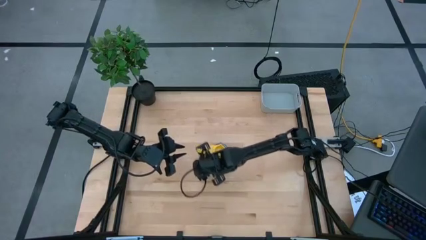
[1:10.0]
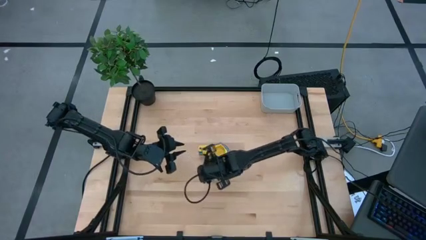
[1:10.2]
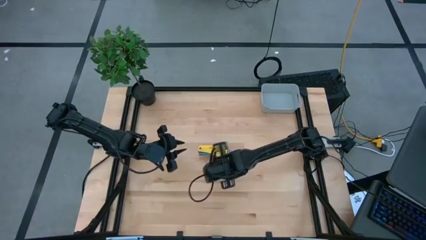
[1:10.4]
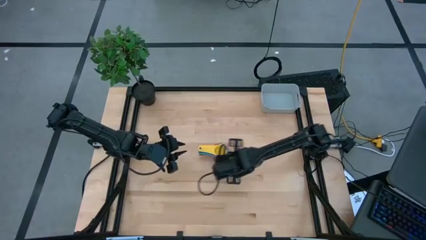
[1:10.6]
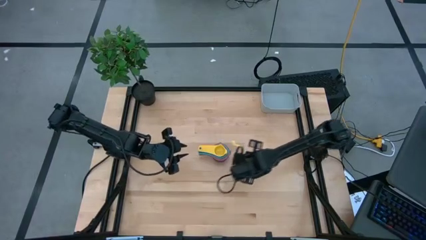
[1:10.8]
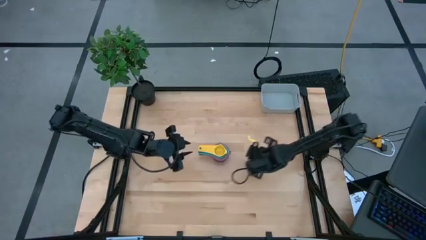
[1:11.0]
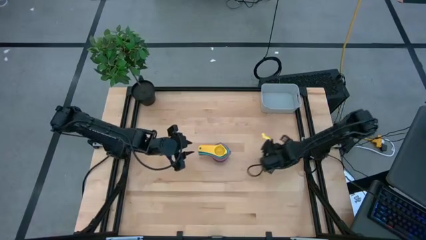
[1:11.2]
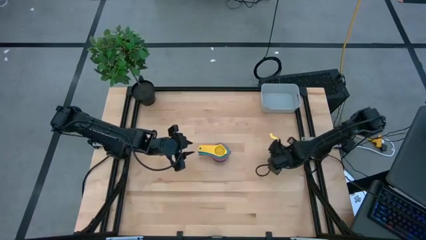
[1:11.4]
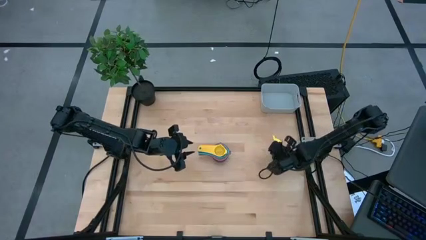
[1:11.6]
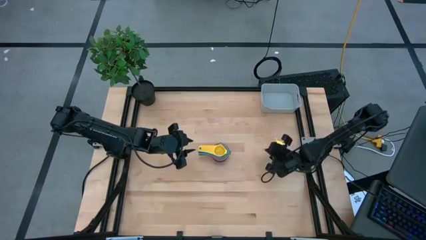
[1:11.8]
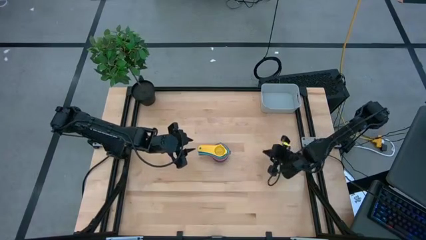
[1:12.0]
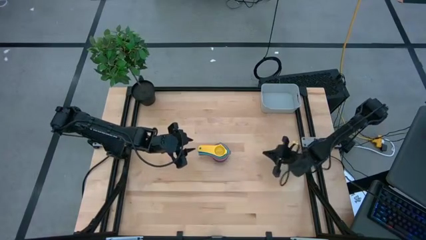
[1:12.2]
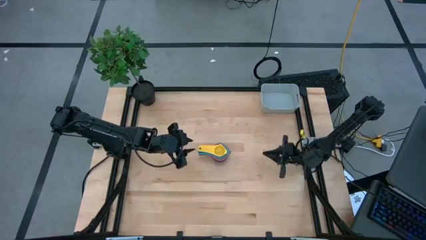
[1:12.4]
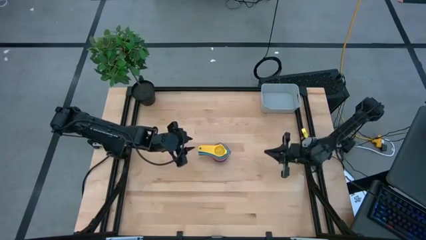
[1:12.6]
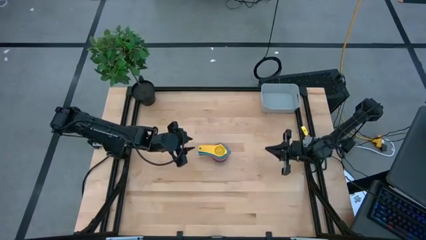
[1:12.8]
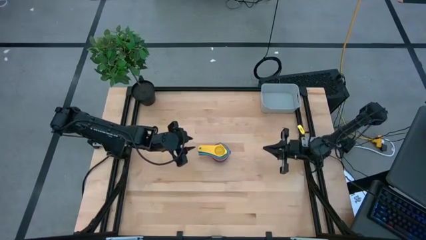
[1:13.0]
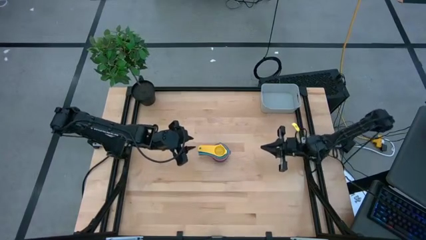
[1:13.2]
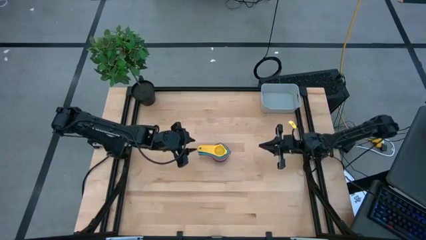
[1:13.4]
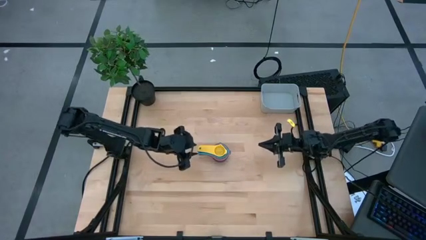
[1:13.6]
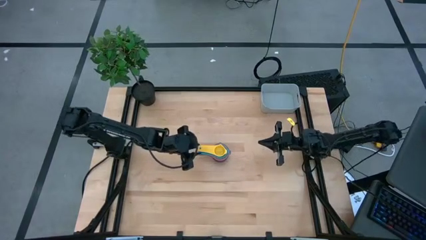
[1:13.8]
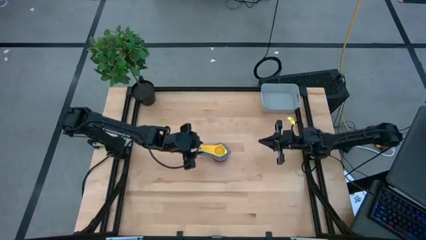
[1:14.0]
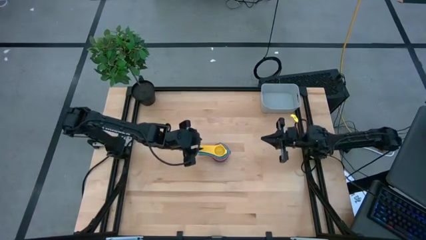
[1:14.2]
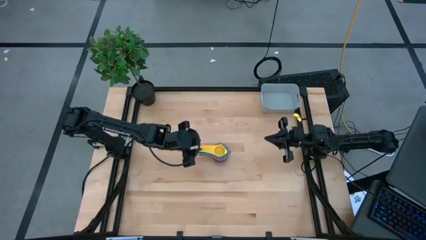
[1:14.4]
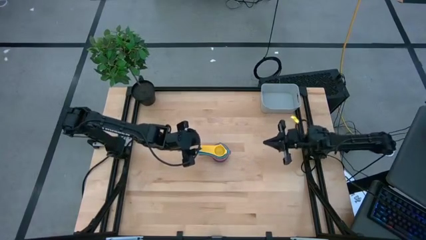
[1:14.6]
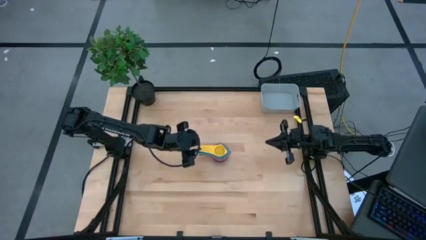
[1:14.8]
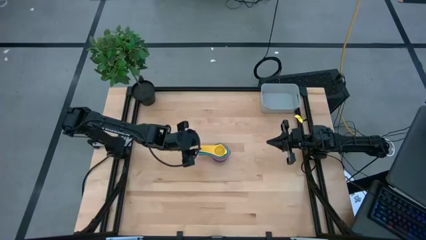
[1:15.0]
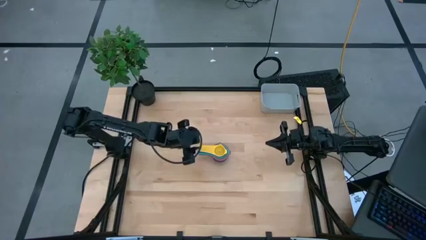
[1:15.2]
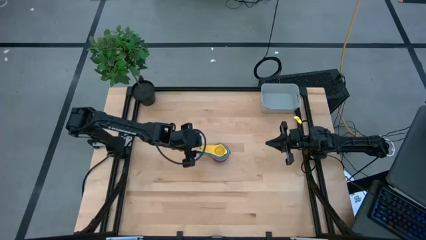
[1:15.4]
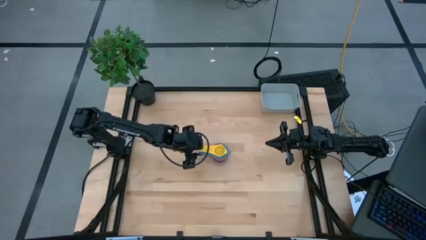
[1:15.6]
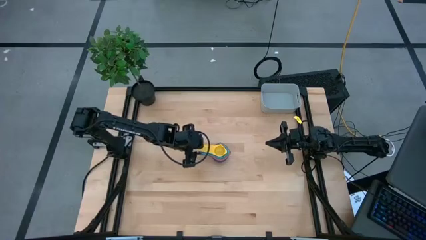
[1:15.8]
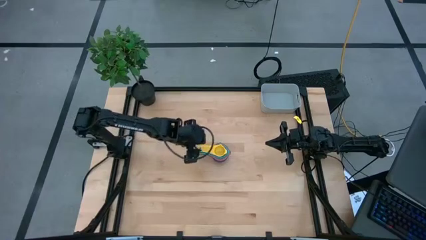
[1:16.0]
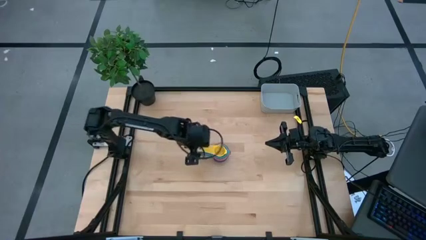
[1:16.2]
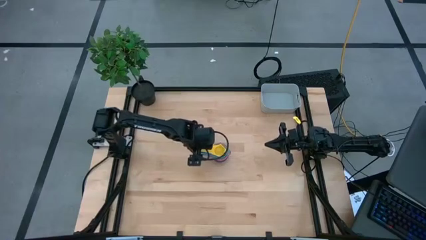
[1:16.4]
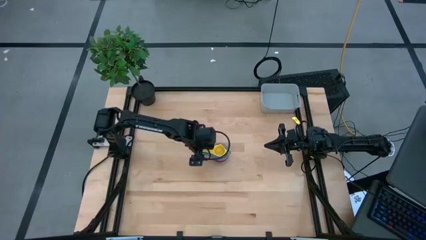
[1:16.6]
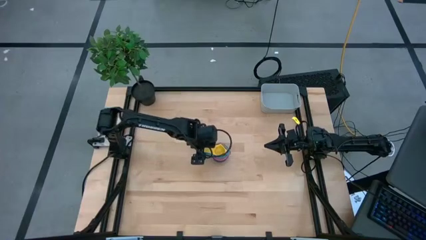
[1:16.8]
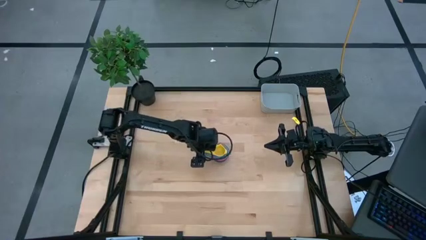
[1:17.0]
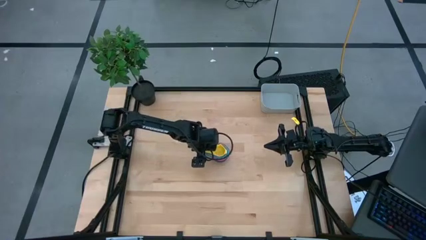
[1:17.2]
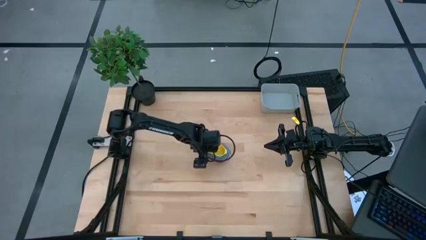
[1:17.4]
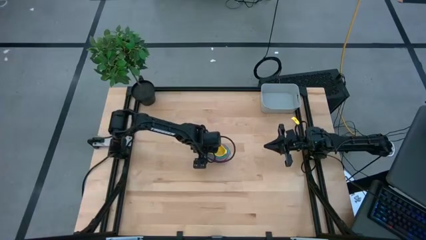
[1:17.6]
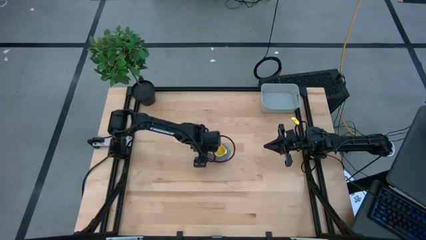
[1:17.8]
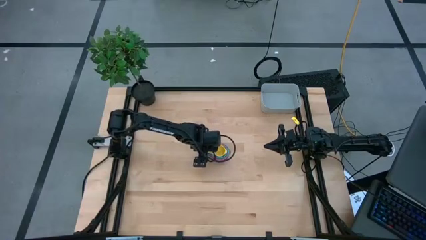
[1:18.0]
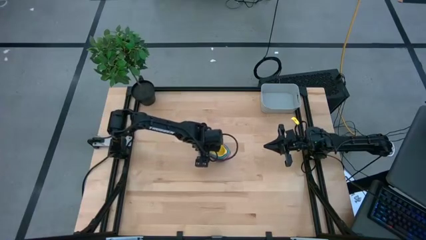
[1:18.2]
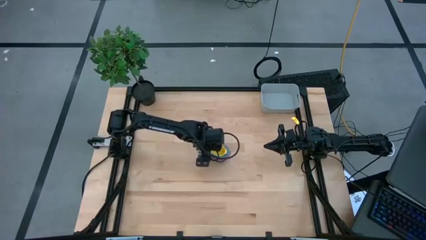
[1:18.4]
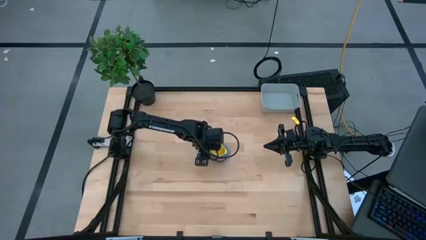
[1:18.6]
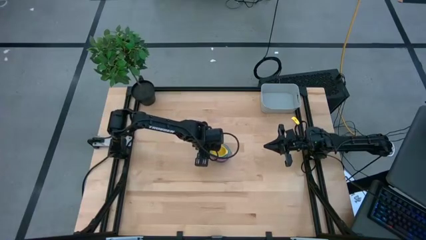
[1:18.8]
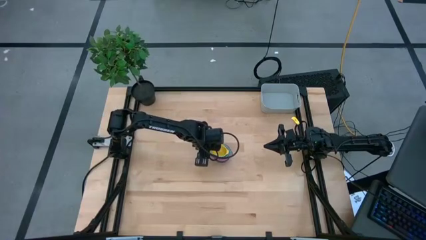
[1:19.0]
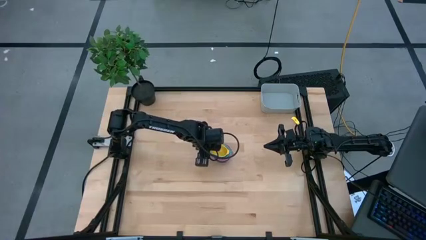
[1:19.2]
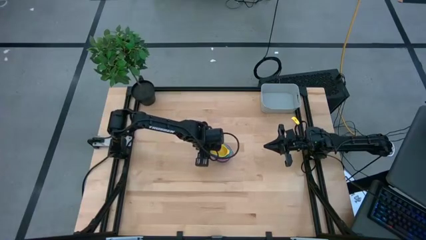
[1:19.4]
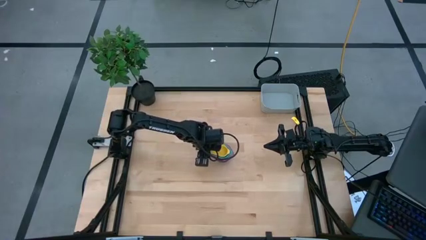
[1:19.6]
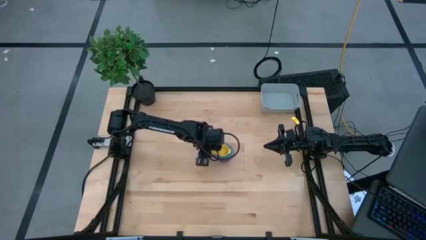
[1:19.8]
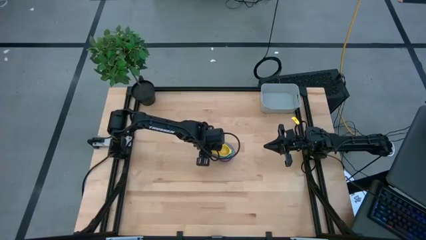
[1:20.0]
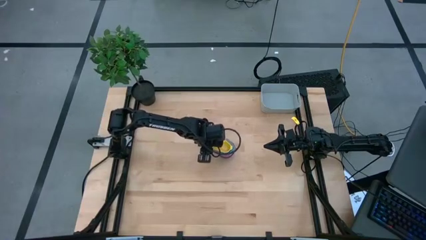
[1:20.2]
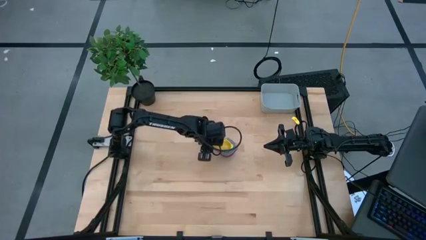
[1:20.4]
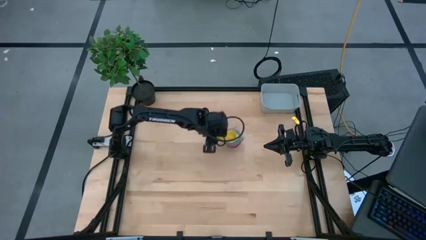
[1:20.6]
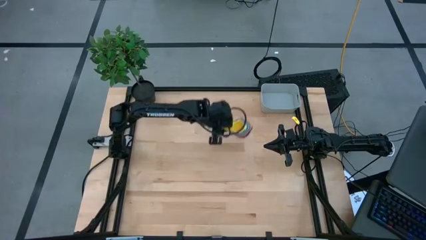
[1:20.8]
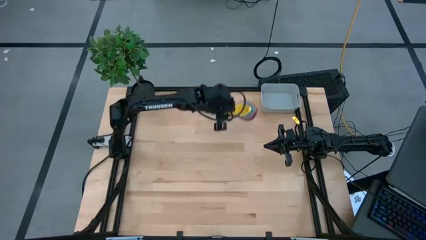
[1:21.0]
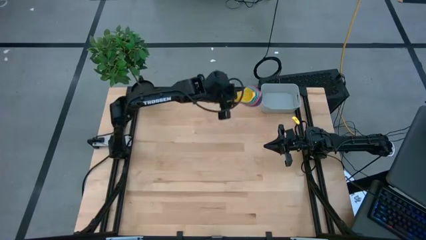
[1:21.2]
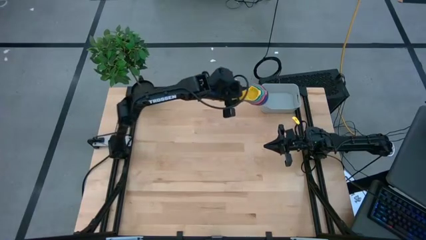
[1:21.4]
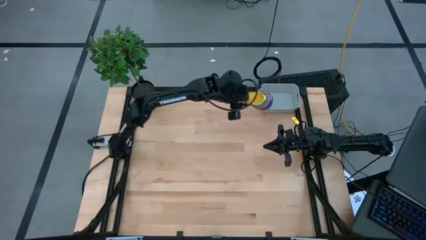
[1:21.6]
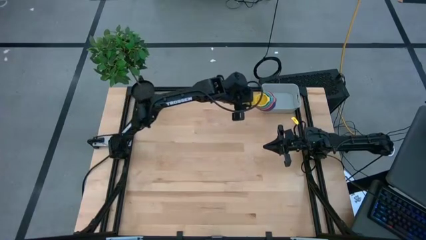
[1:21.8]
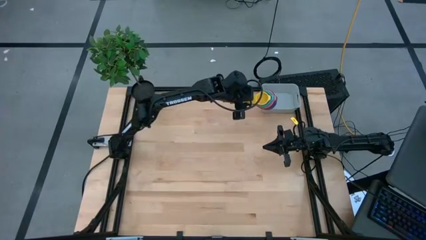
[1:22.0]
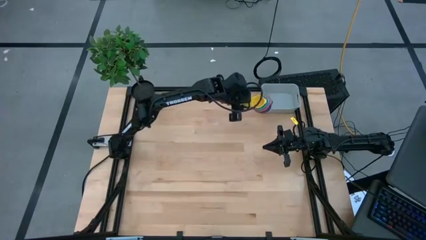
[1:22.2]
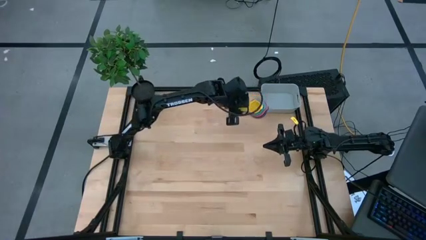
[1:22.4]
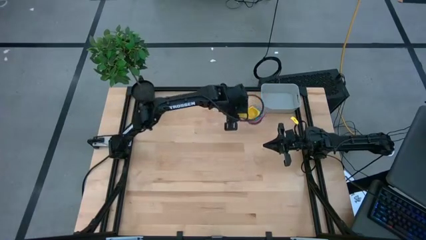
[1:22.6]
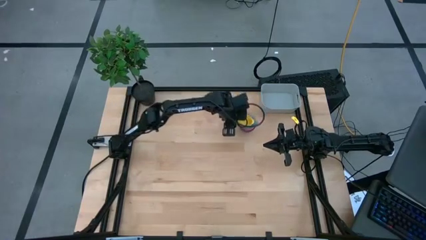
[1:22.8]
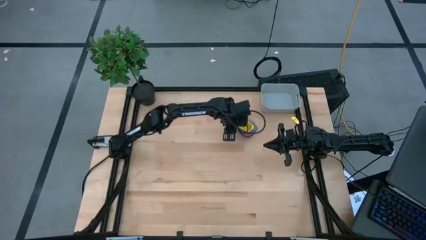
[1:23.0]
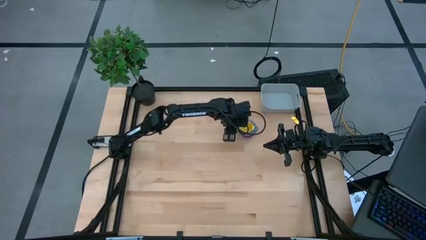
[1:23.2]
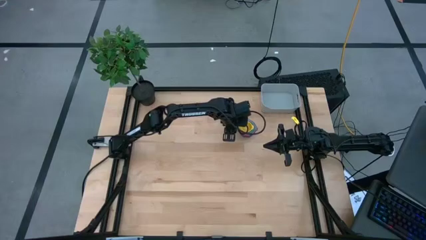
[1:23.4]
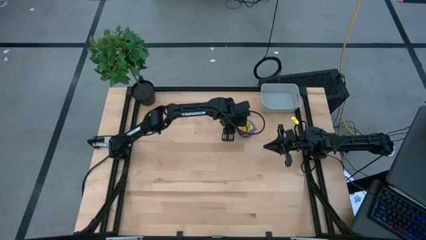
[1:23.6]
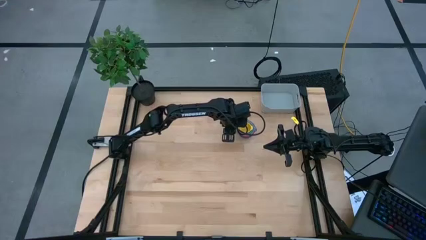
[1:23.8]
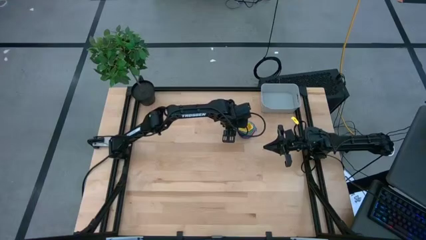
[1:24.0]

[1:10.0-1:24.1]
Task: Nest measuring cups in basket
Put the stacked colored measuring cups into the gray bin

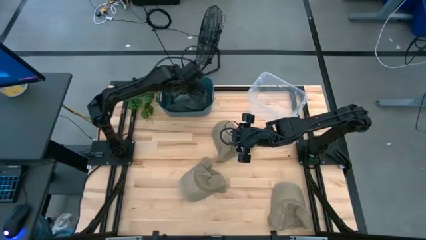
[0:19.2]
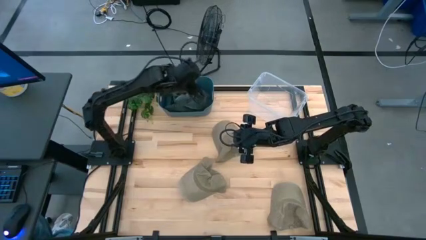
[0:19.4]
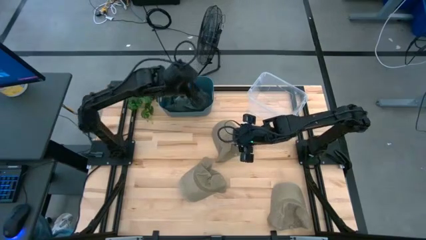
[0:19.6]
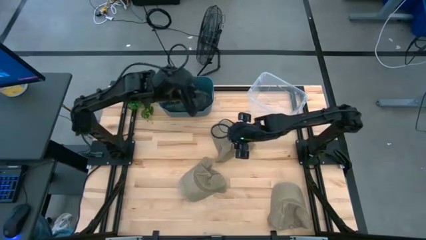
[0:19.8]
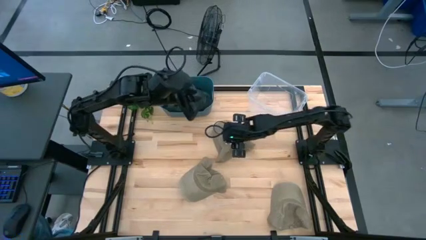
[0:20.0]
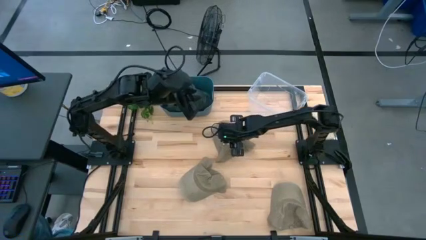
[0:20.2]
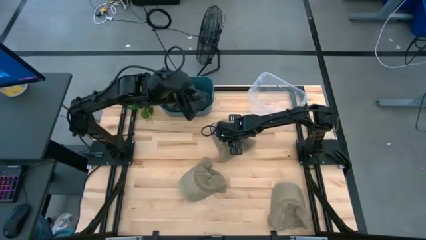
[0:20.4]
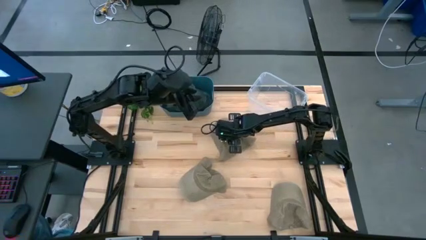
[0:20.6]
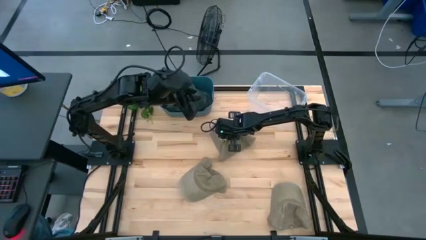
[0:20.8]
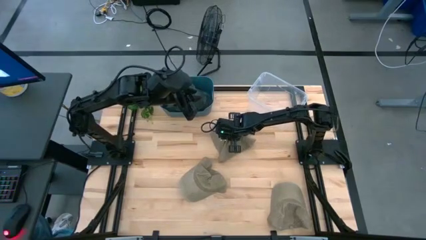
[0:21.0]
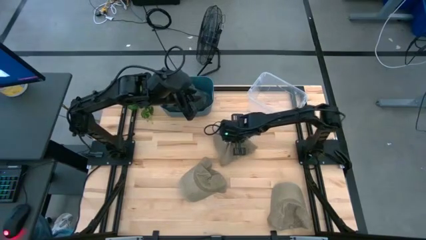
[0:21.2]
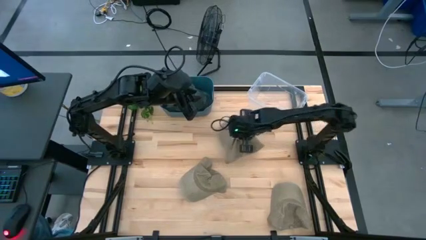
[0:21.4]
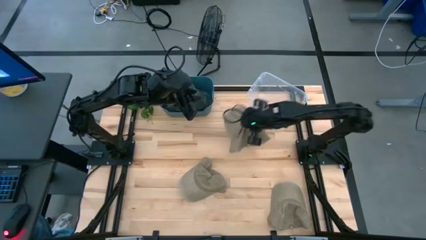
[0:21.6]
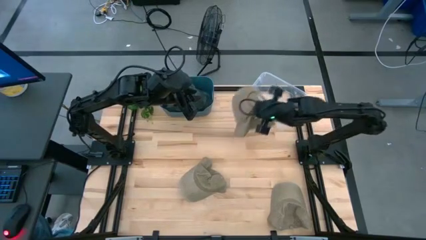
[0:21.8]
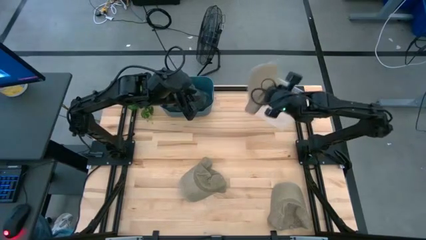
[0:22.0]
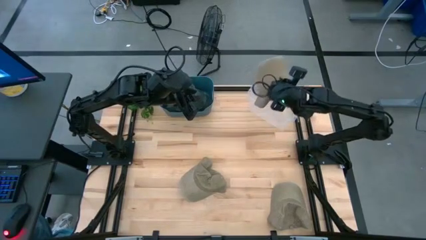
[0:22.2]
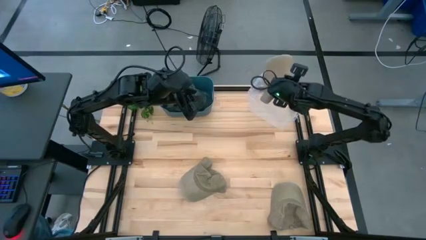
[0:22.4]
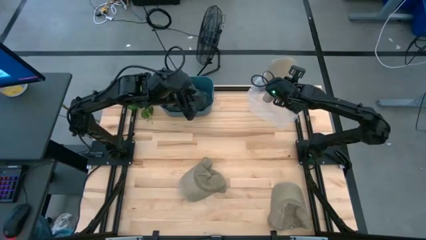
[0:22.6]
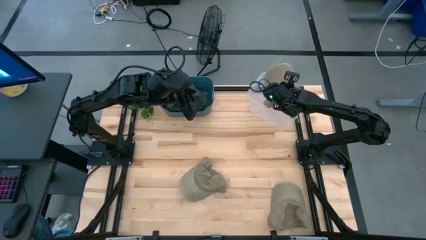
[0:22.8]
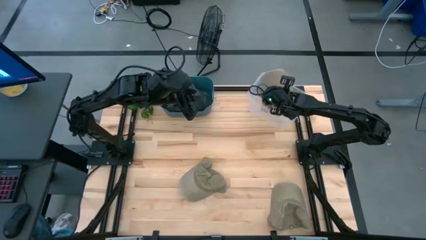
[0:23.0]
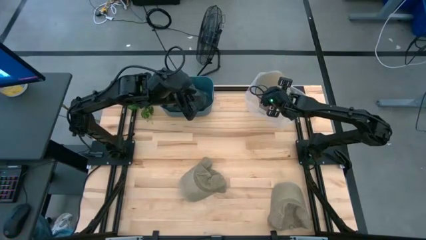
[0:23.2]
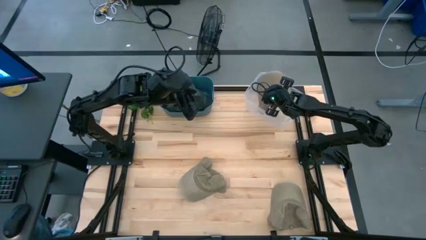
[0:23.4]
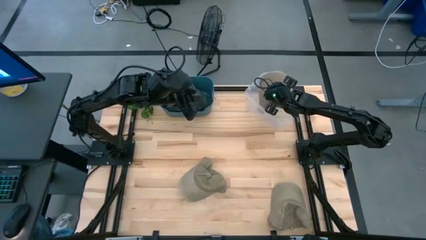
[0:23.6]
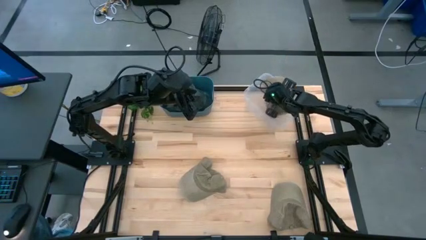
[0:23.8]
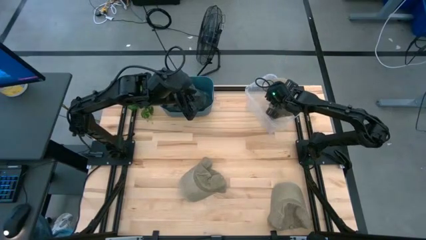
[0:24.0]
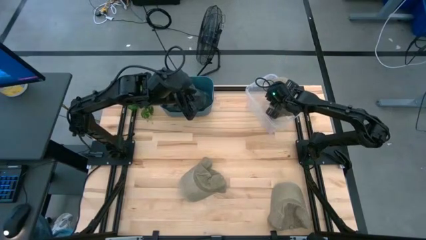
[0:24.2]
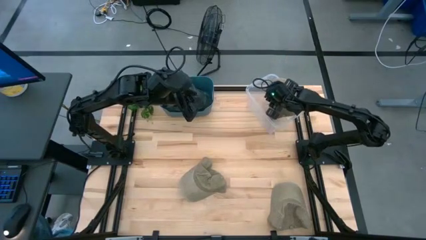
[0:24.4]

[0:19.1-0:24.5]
Task: Pick & Place hat
Put the top brown cap into the transparent bin
